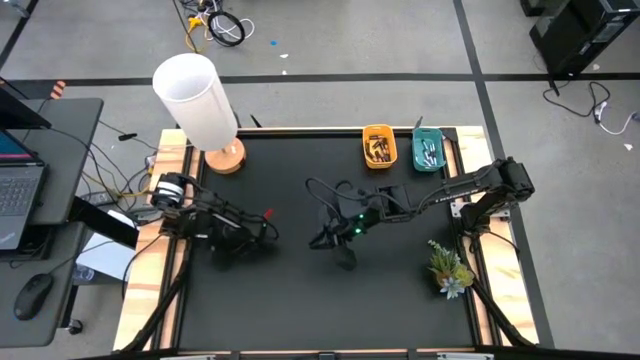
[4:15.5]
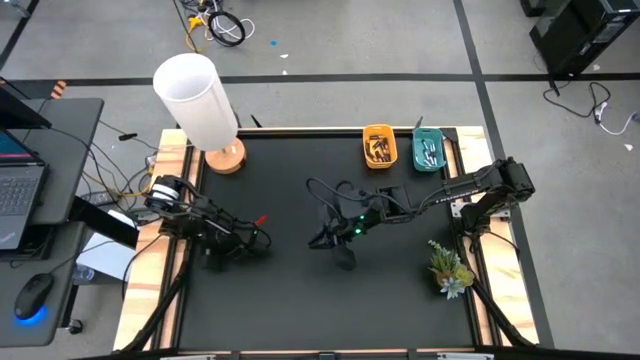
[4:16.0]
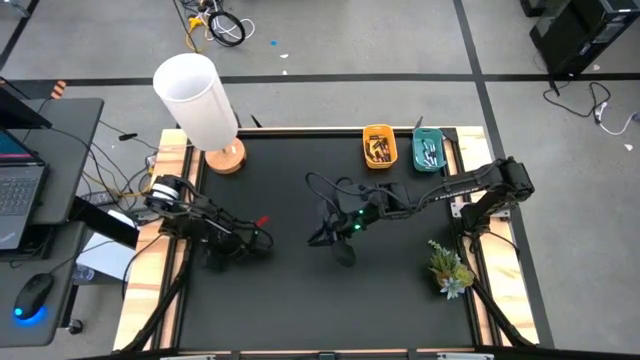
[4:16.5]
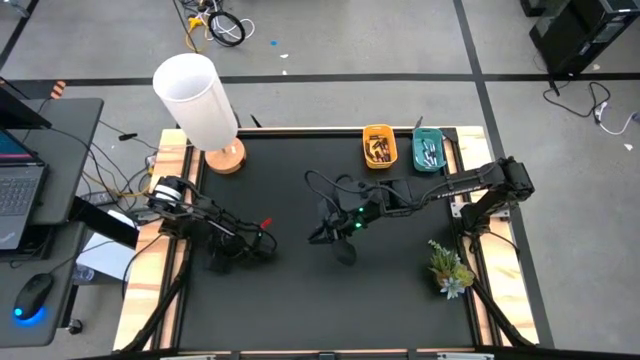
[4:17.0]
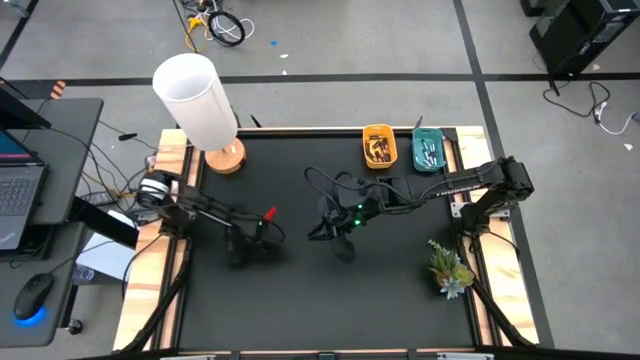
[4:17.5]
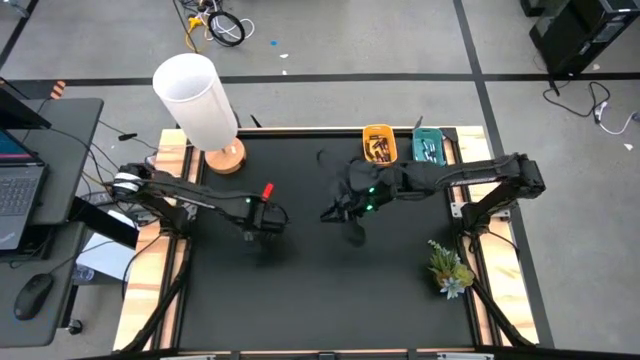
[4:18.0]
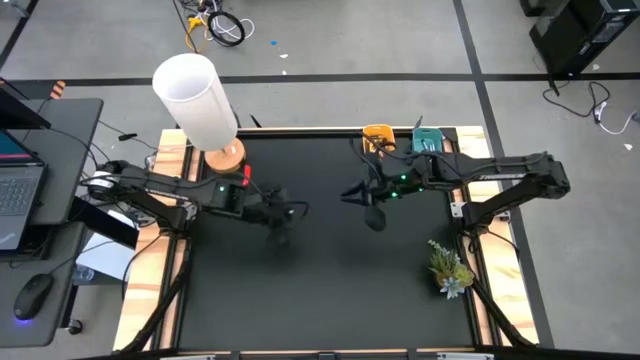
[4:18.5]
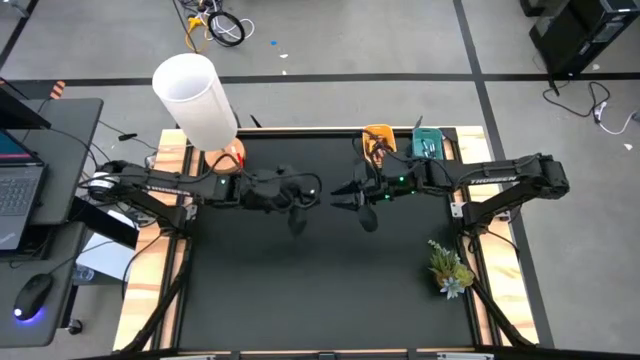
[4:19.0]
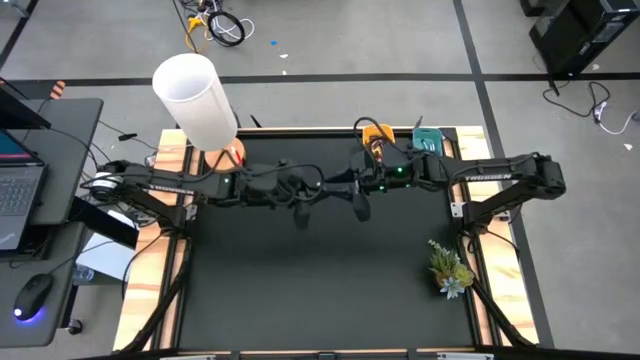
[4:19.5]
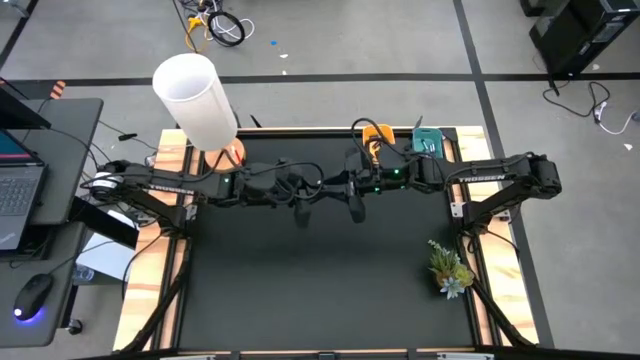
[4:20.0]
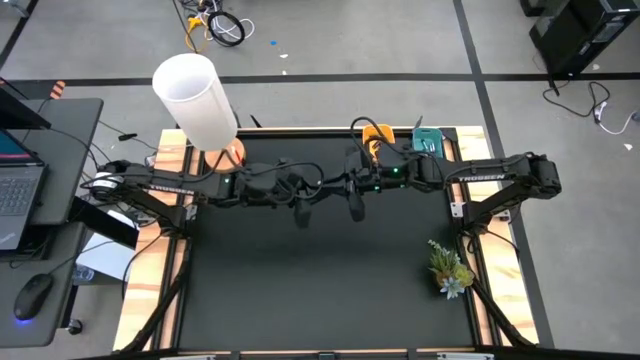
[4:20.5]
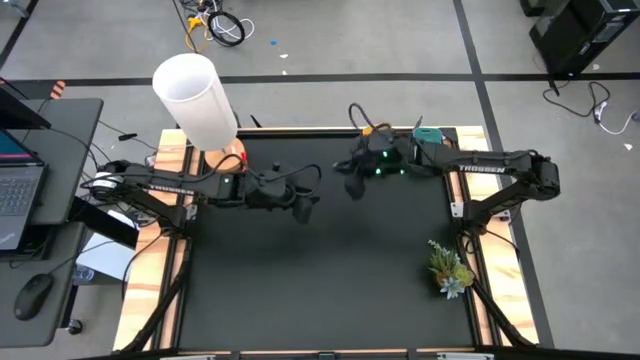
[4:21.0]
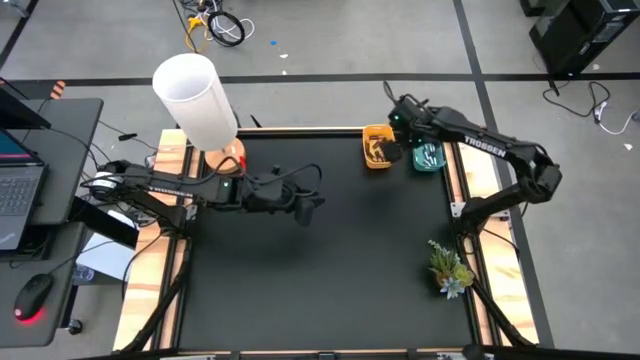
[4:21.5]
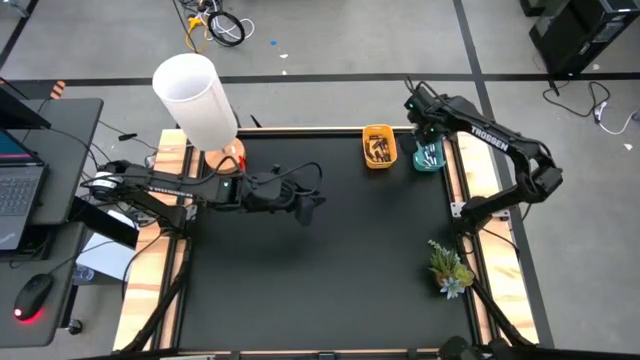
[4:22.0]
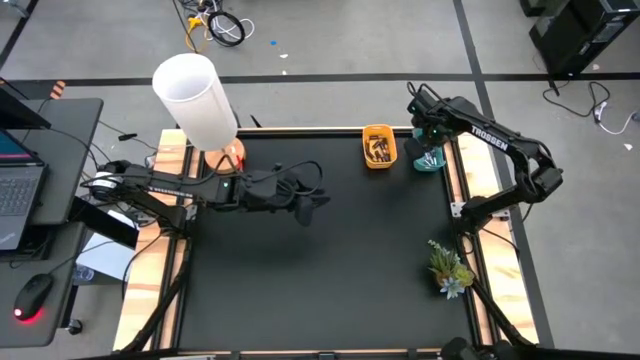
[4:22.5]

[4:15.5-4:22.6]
Task: Sort batteries
Put the silver battery into the blue bin

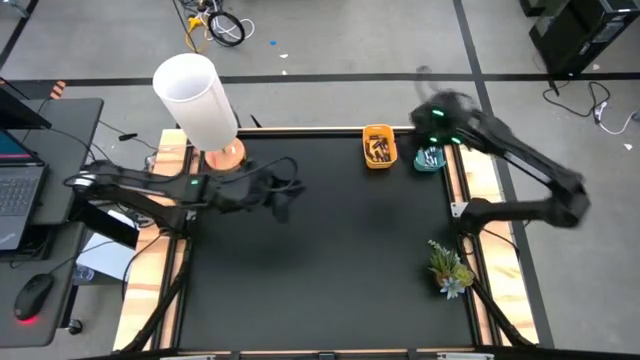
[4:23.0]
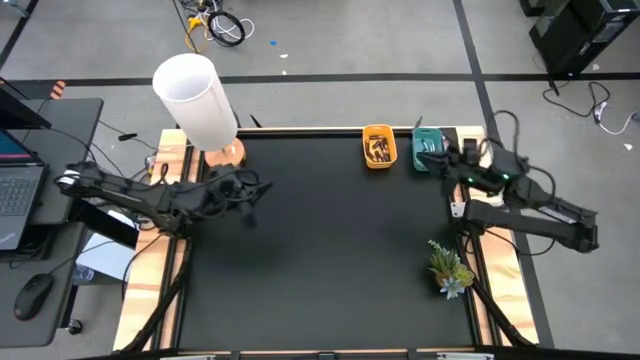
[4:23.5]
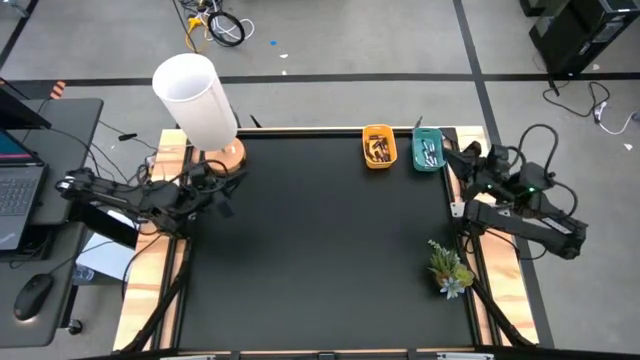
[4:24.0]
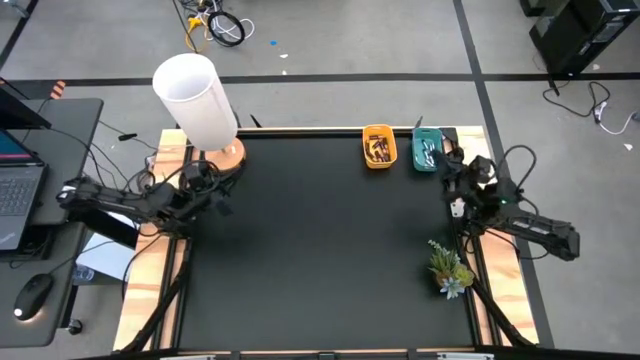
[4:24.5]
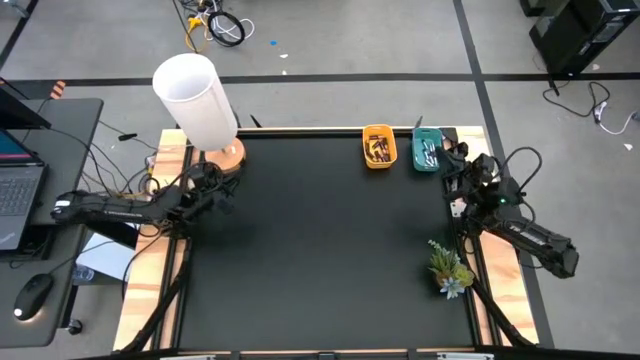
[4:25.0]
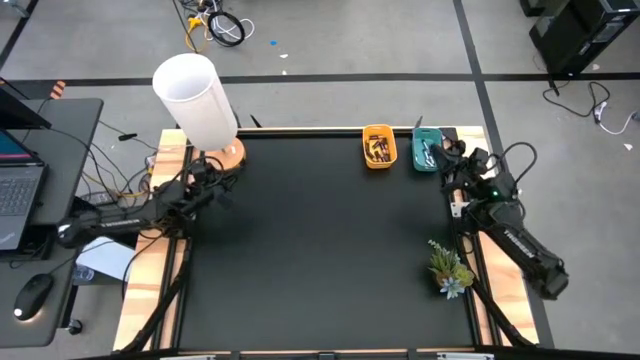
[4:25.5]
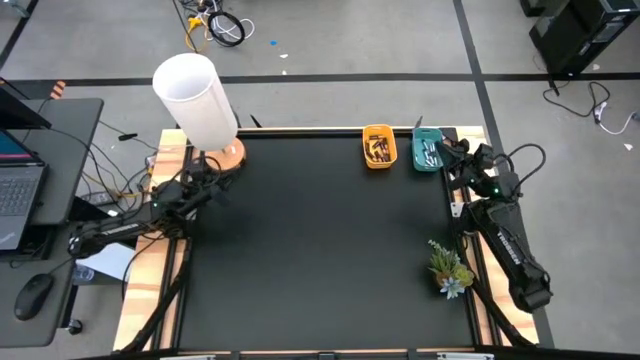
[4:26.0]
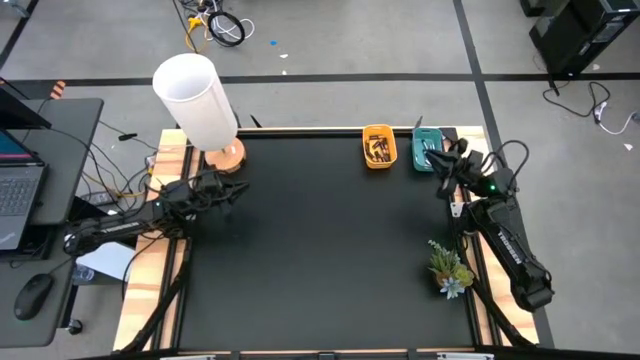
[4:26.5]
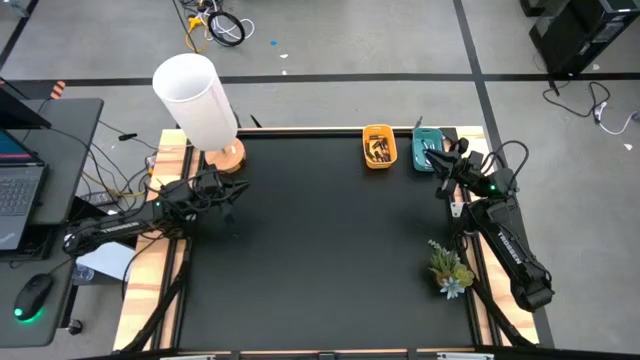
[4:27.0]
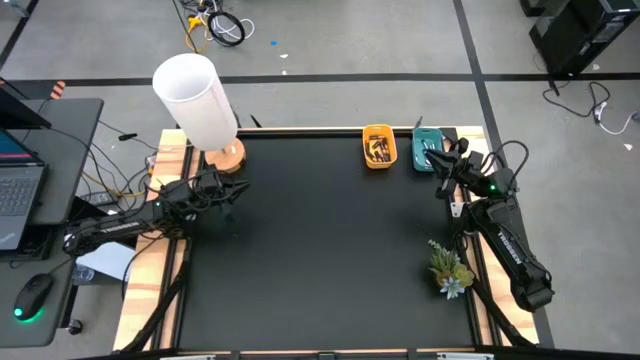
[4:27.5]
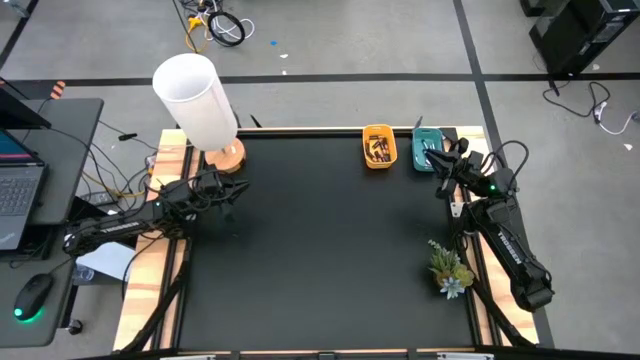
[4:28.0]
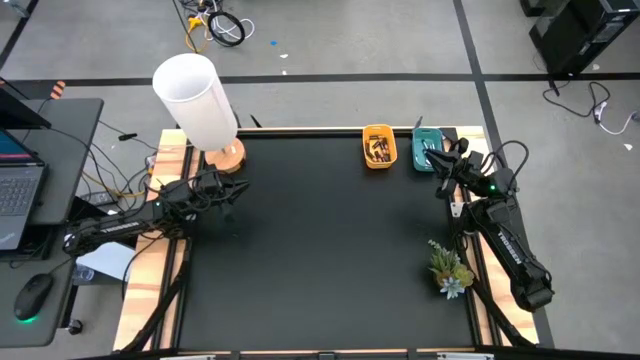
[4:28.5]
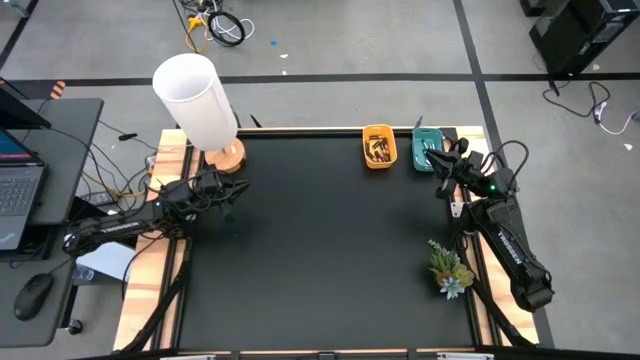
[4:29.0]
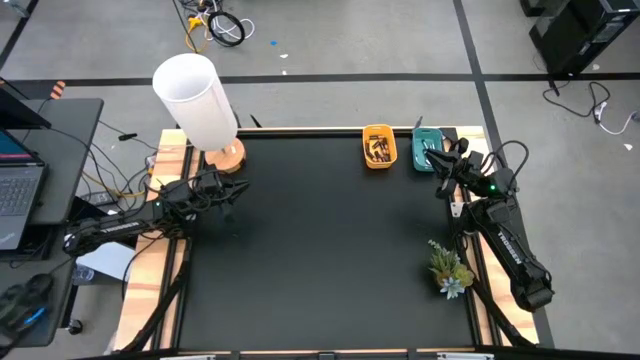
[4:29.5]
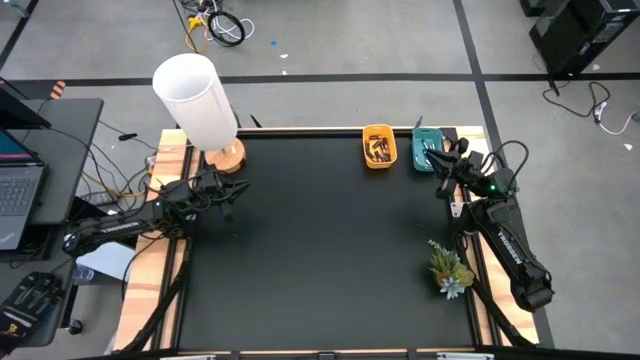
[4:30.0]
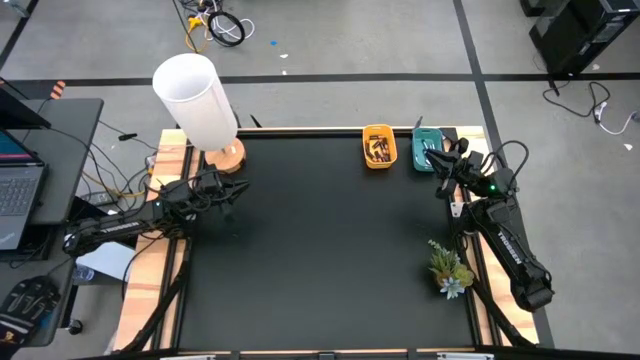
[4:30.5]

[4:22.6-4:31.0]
Return to Home Position

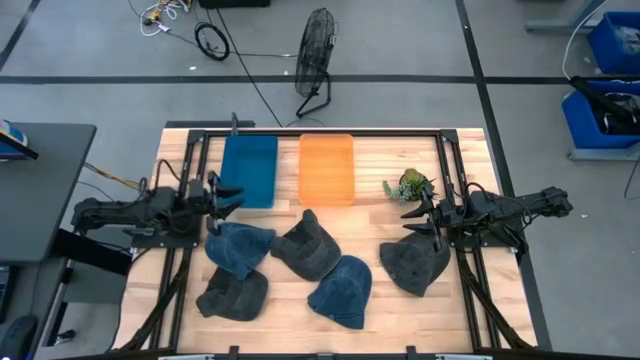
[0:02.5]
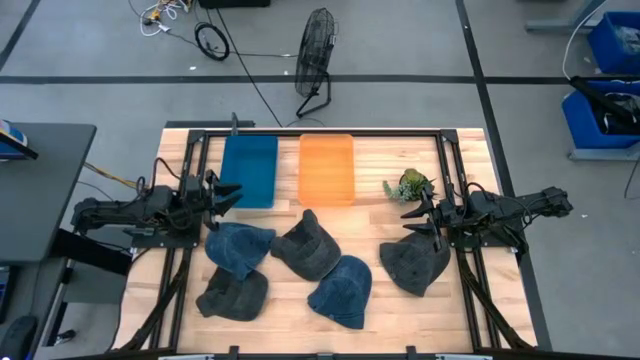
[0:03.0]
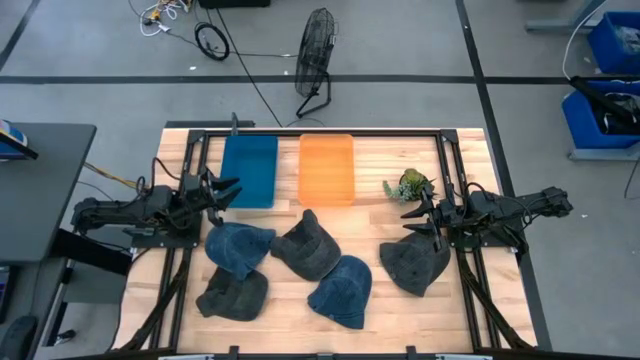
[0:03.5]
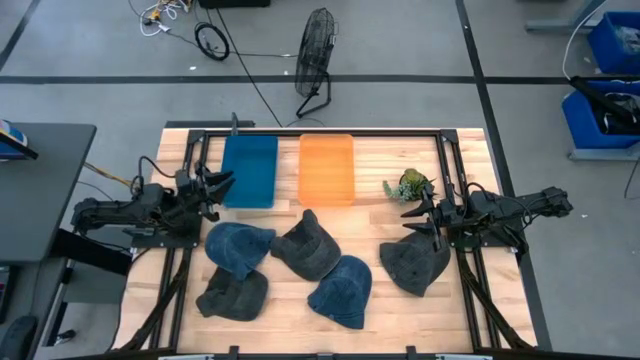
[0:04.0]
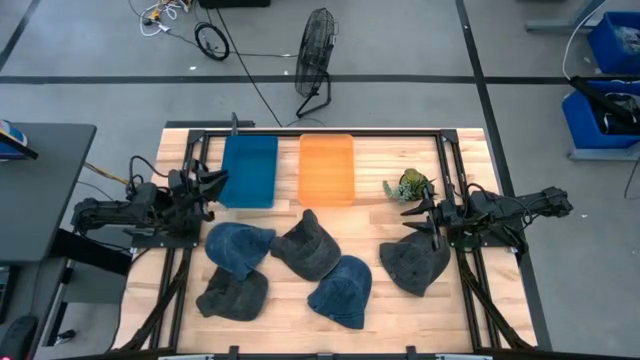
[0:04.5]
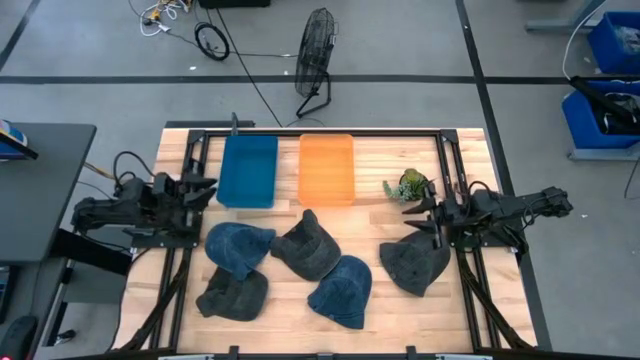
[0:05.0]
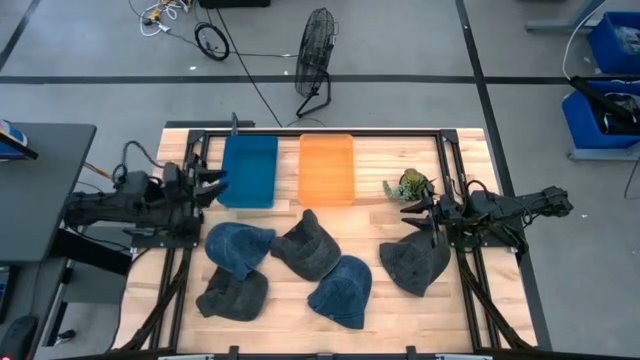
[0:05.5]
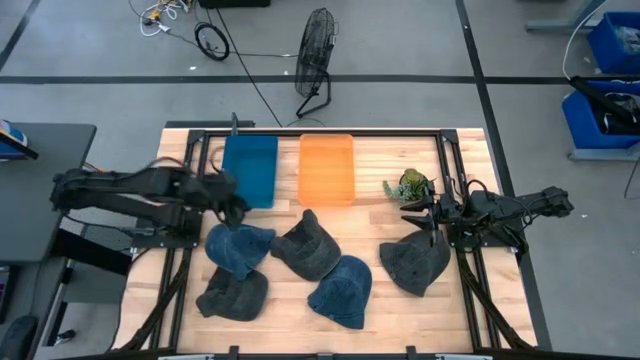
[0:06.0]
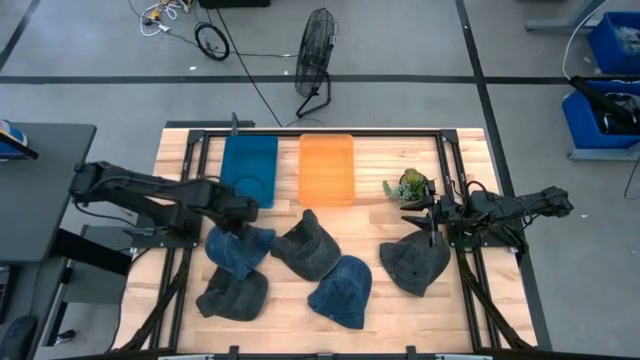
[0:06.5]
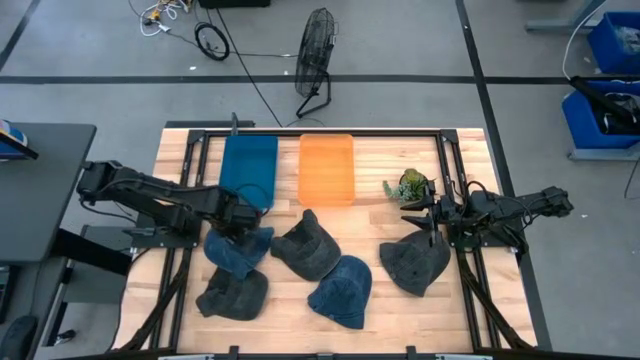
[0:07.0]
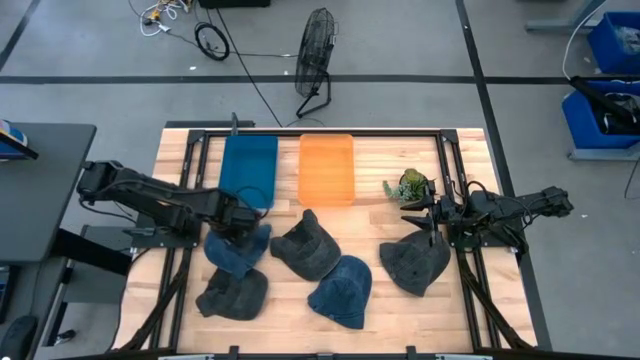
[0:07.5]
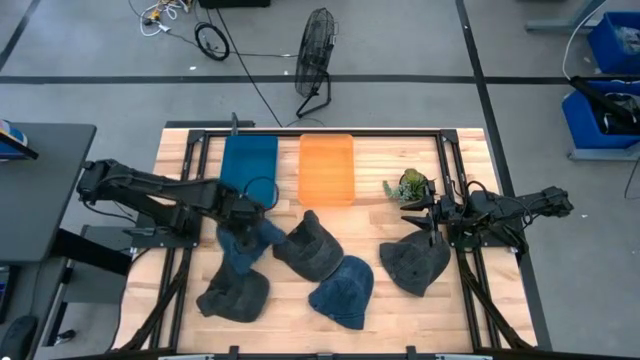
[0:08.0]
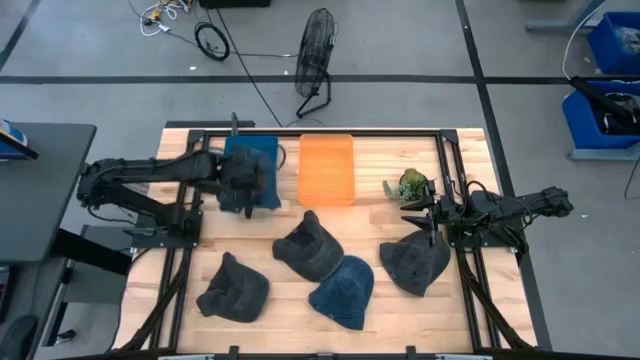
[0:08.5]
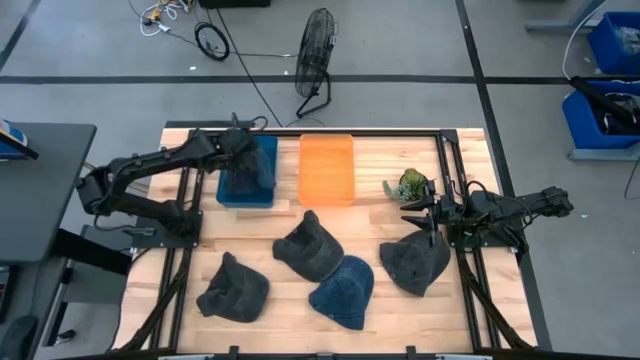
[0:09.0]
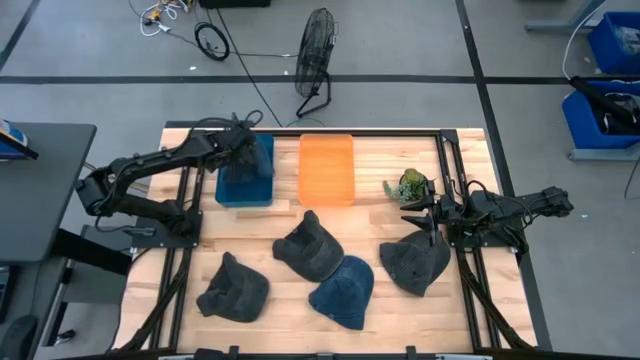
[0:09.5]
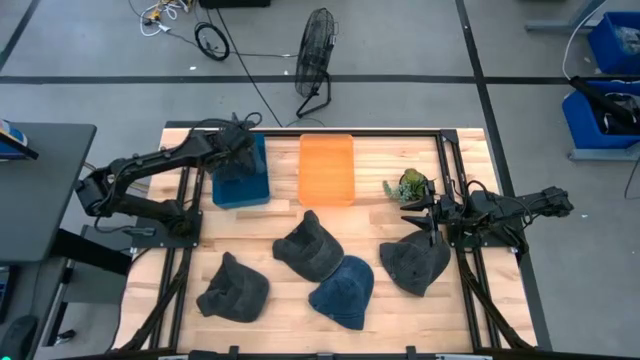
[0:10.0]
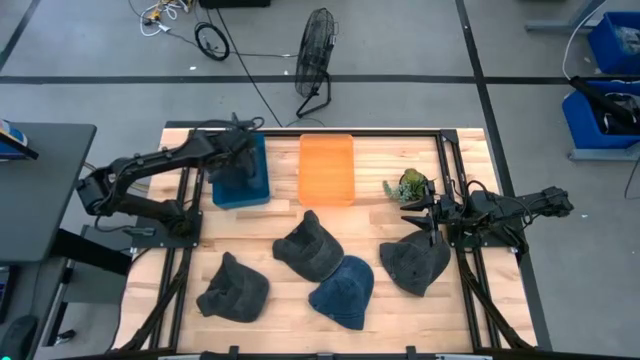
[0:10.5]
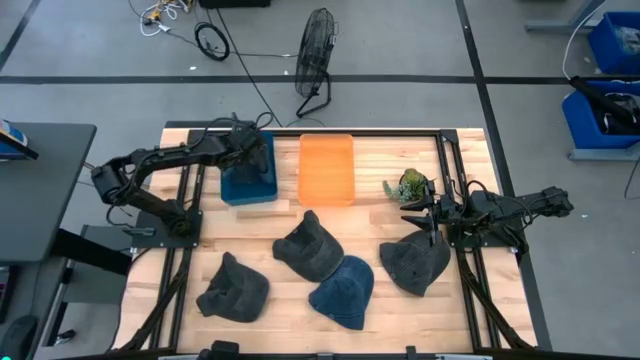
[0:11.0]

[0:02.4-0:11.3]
Task: Pick & Place hat
Put the left blue cap into the blue bin
